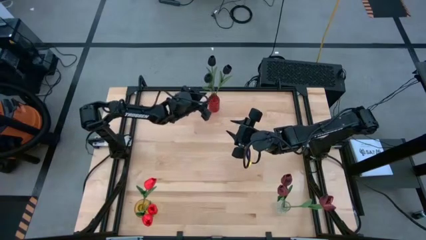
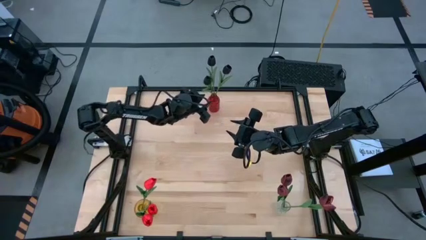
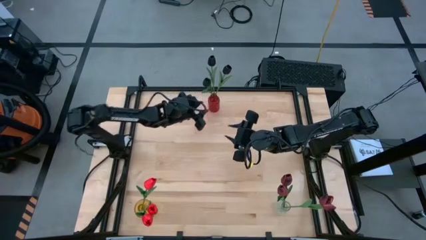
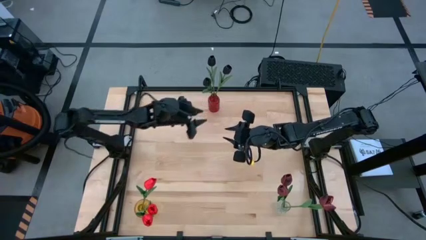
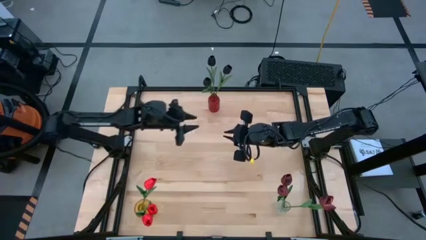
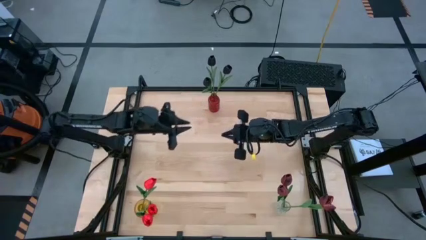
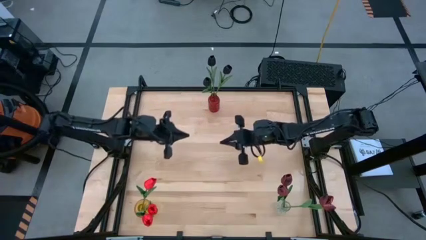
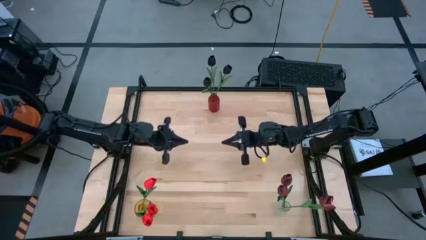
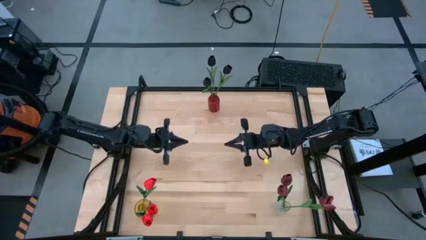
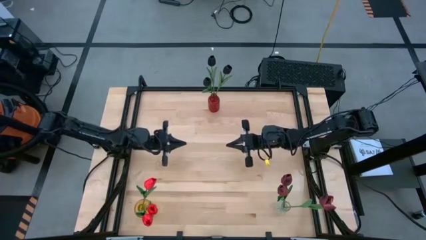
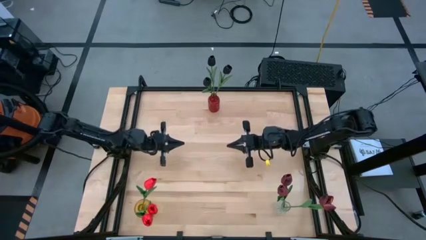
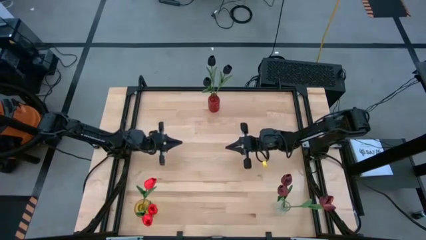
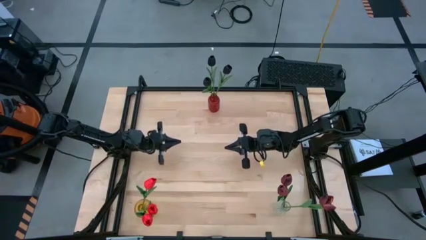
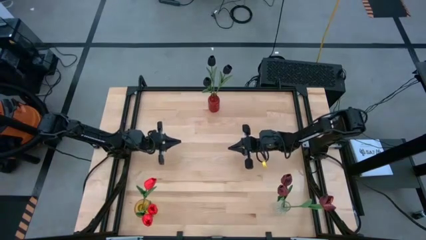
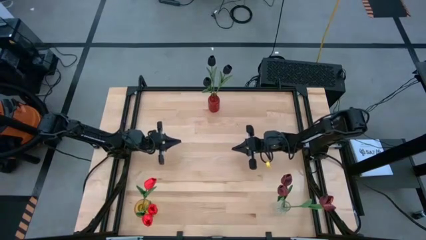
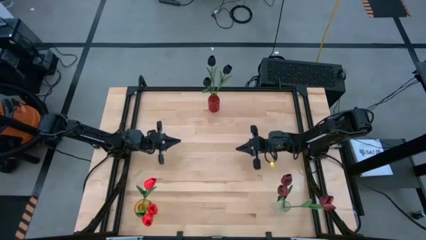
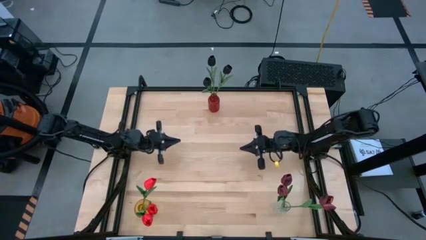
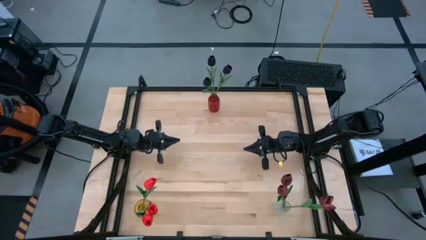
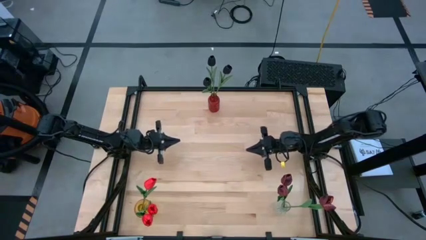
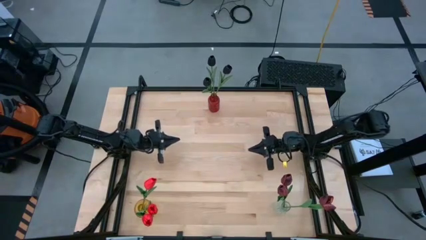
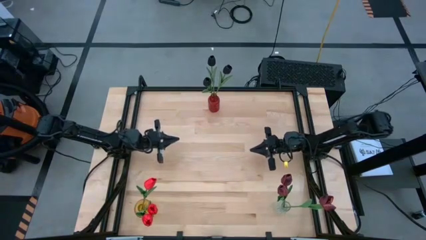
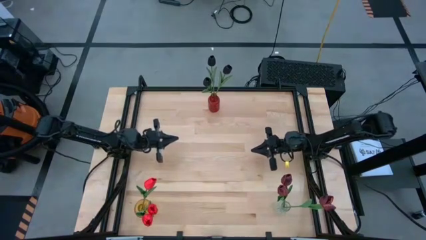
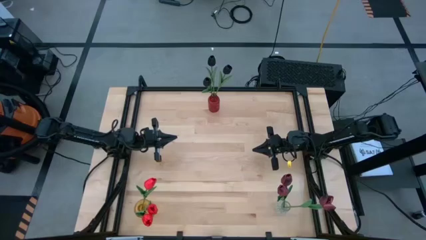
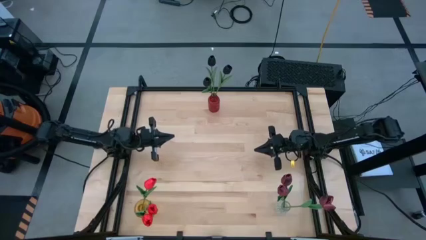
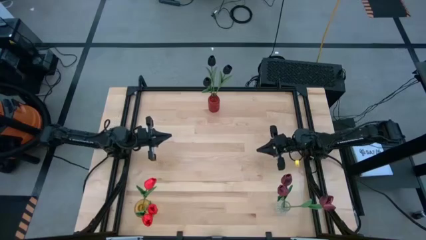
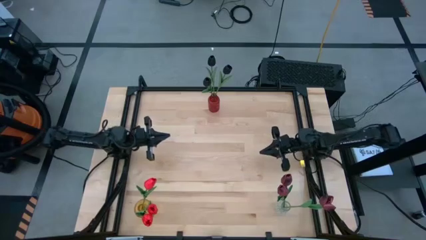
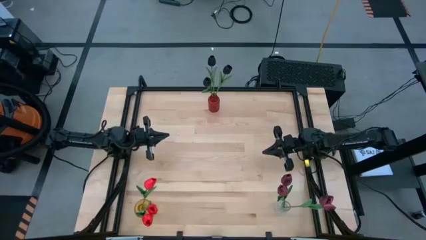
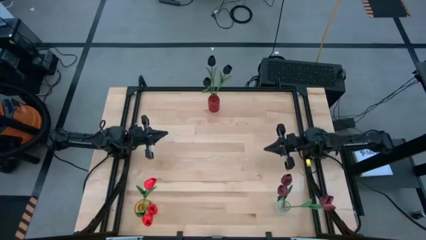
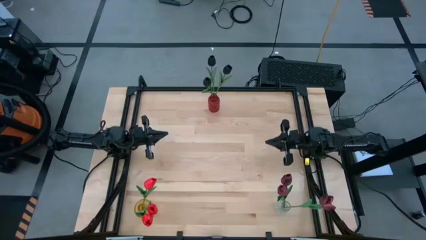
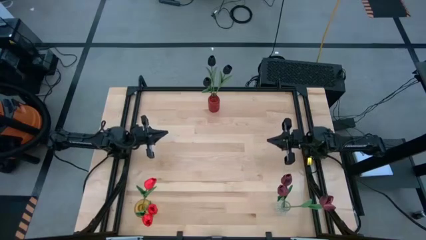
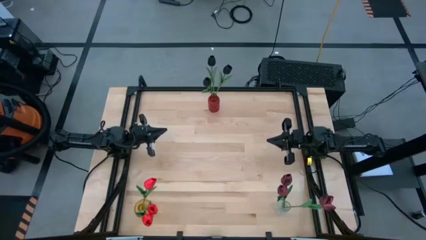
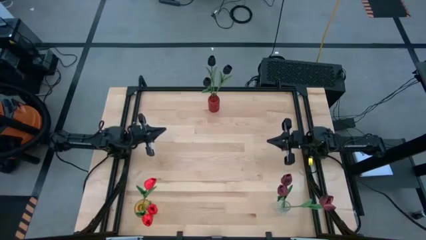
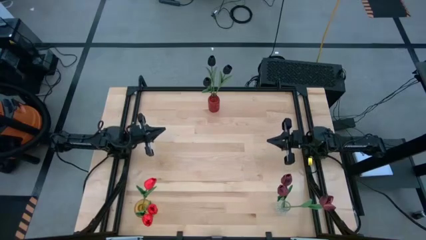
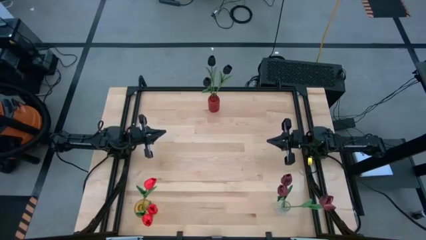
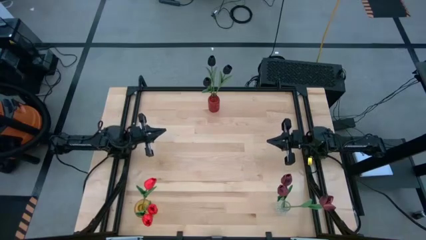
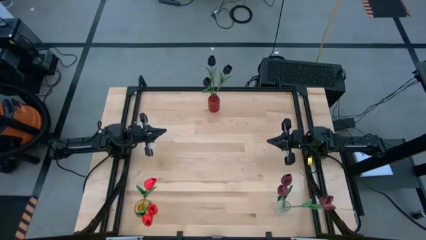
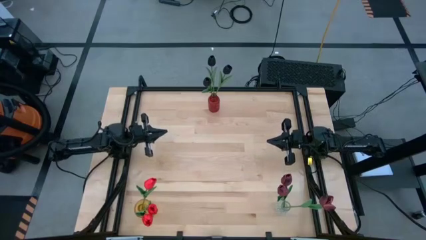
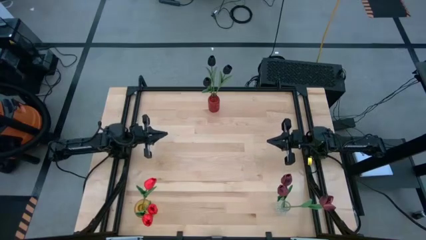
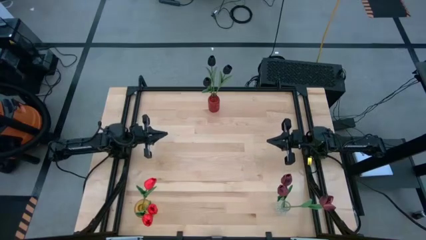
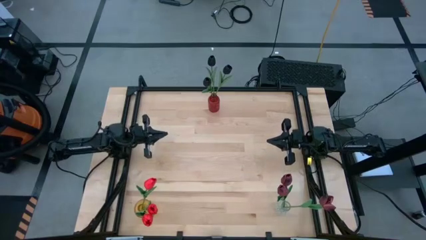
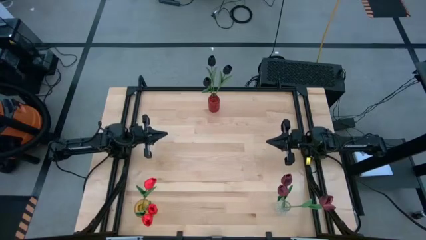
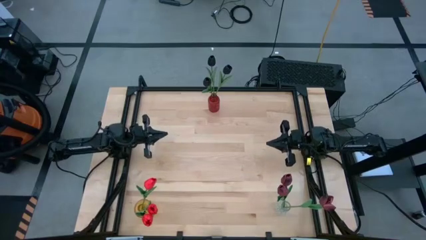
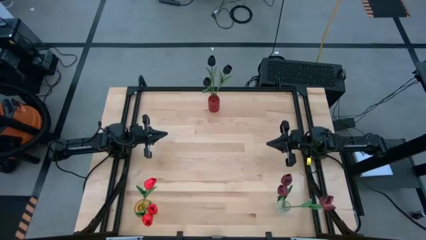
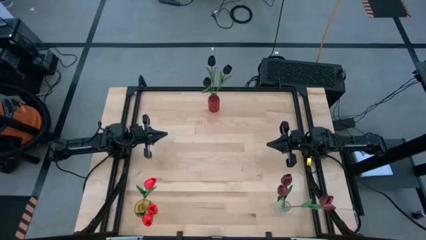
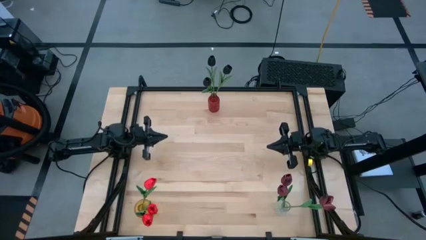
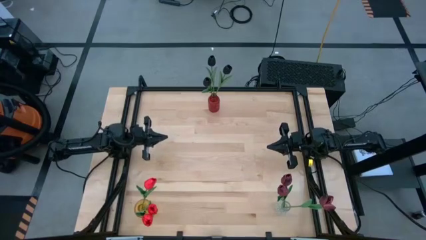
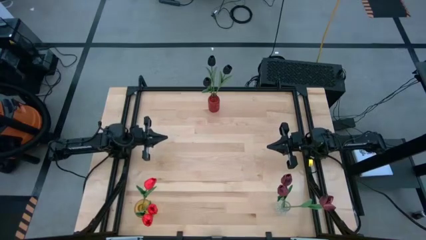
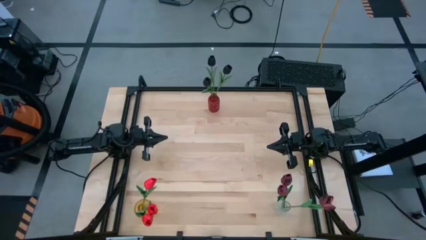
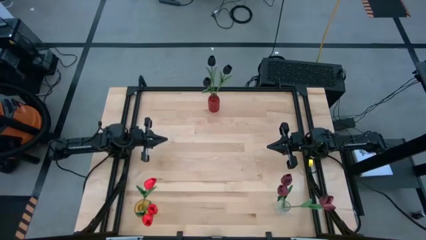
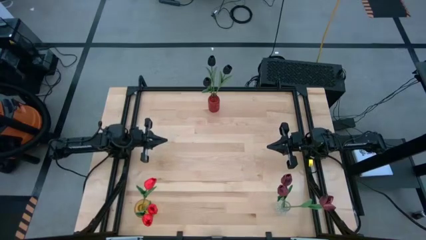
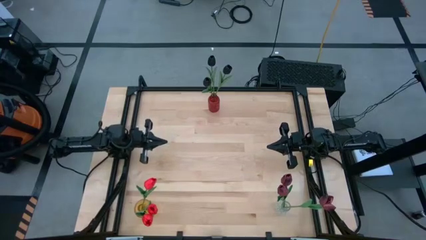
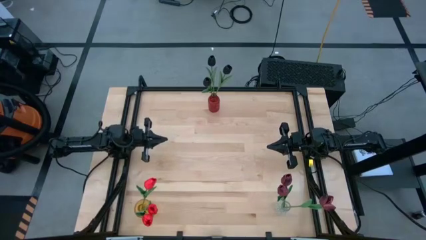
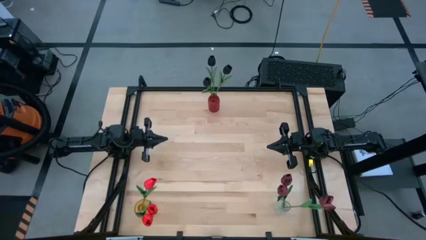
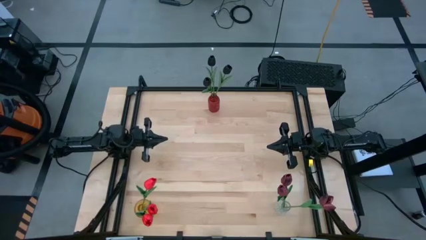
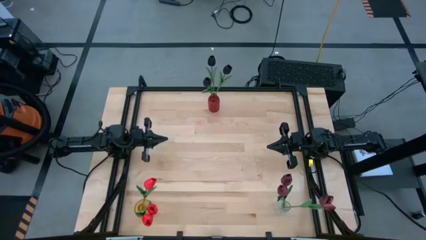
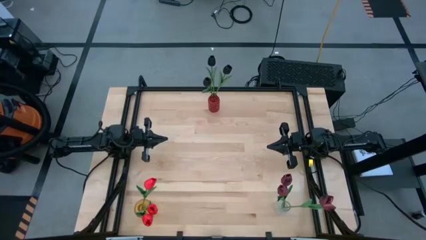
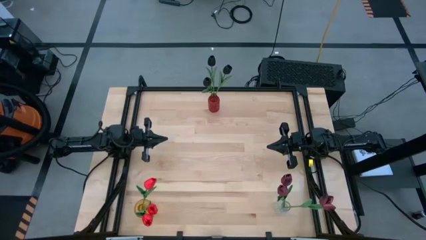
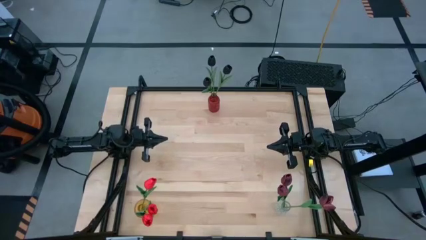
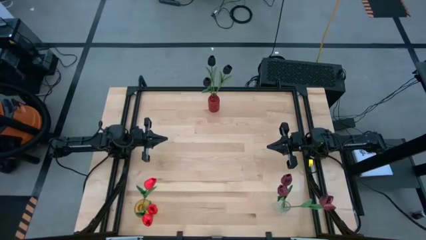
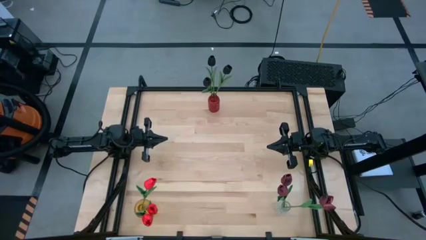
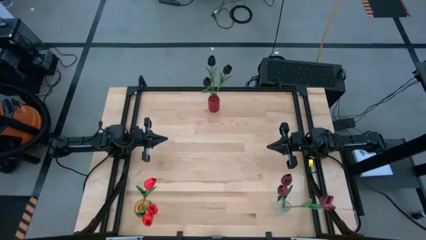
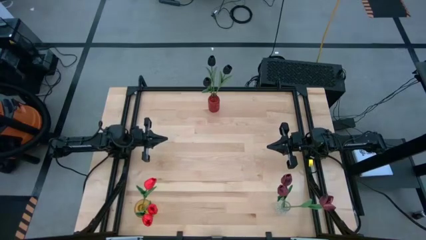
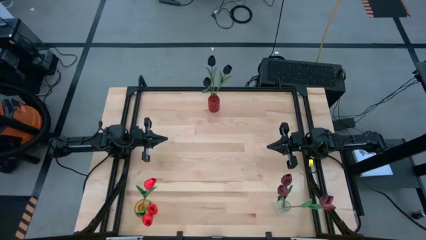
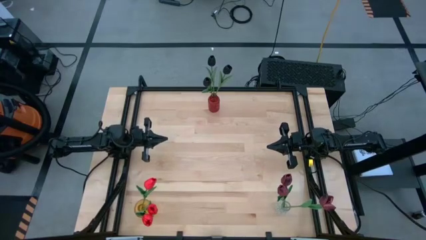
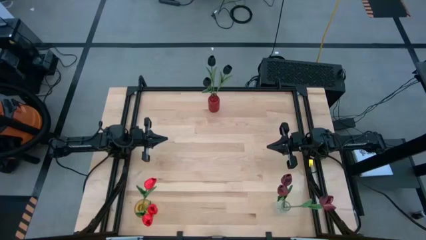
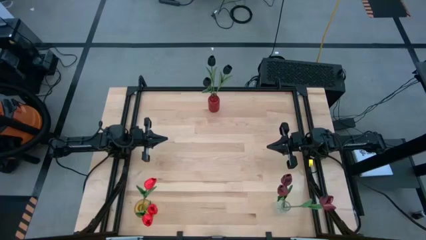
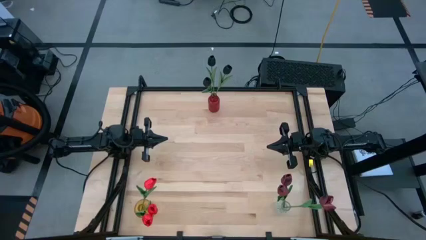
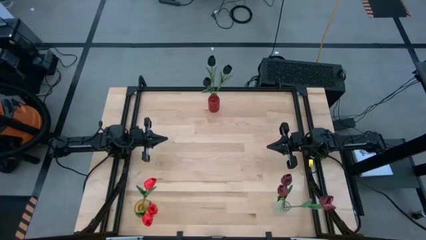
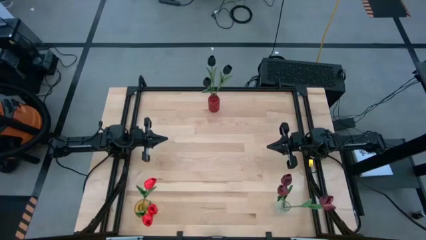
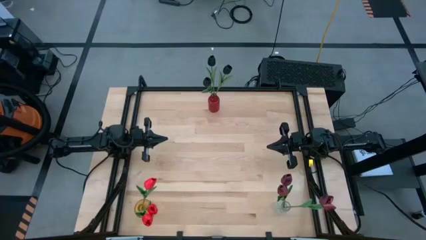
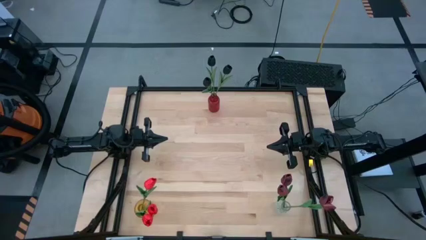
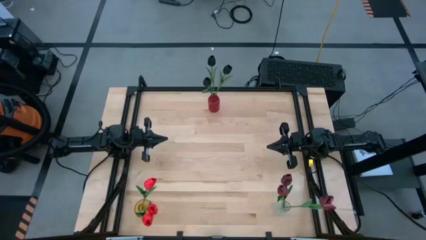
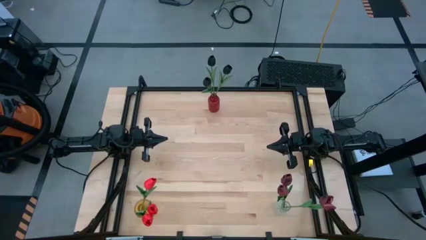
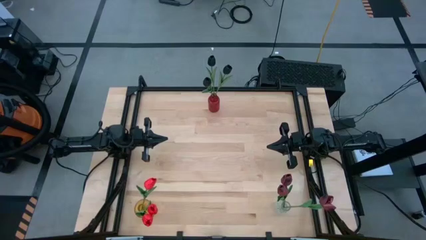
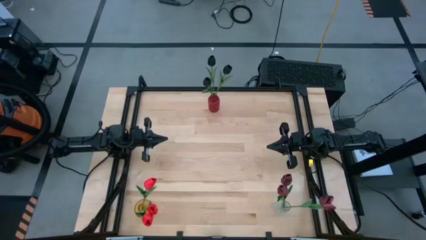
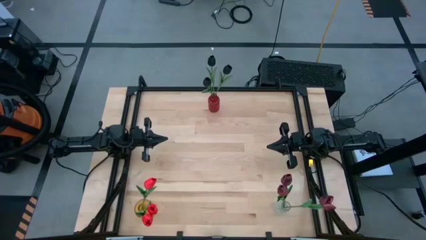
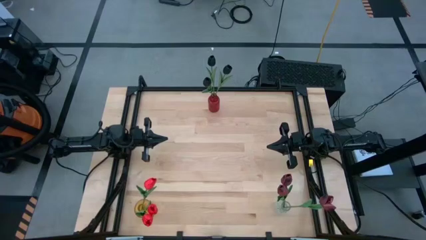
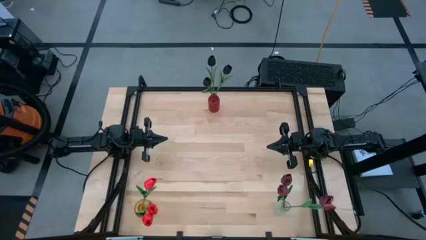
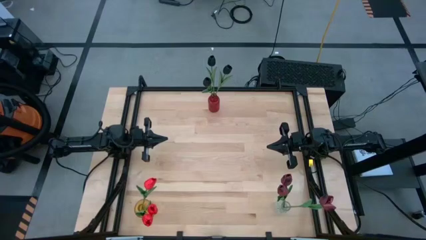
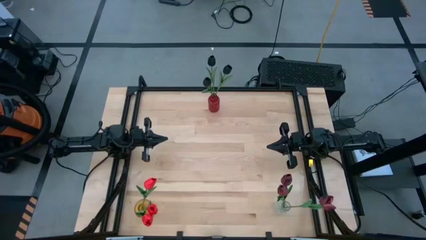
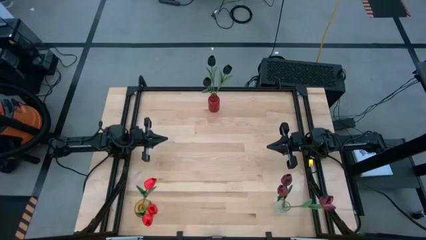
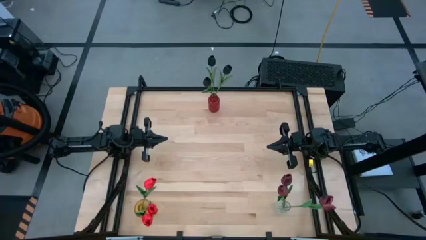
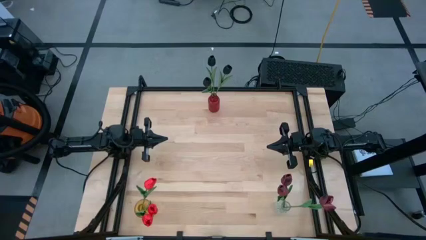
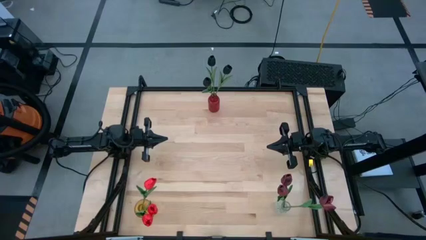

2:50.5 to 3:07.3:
Task: Sort flowers into vase by color
Return to Home Position
